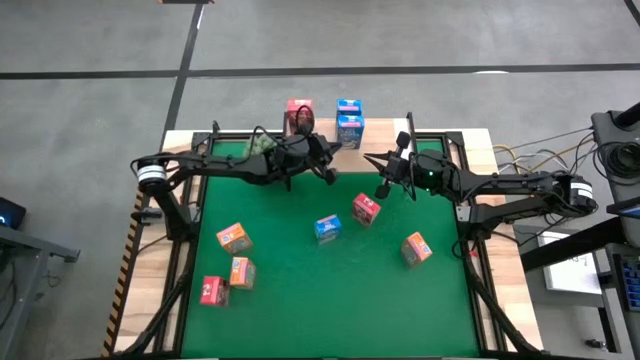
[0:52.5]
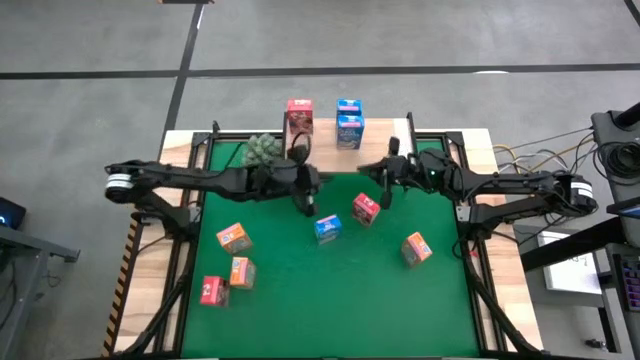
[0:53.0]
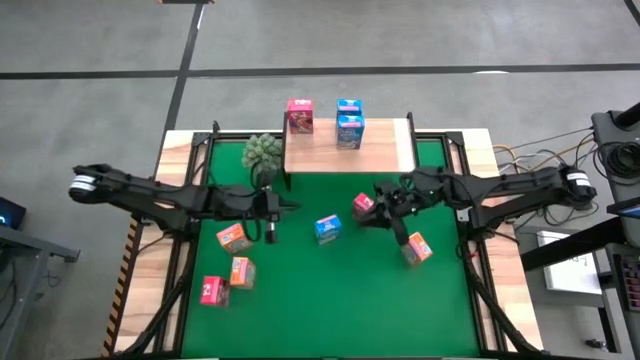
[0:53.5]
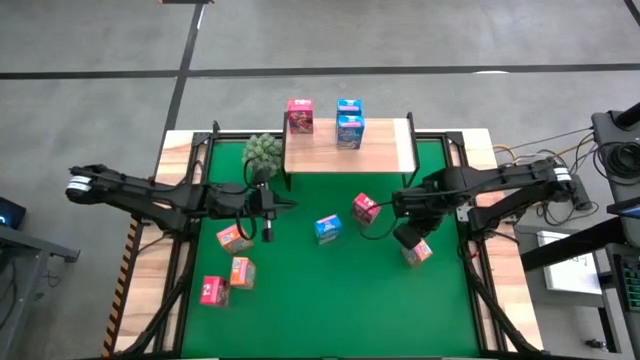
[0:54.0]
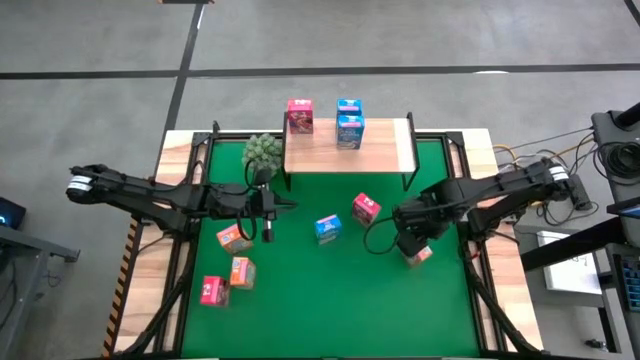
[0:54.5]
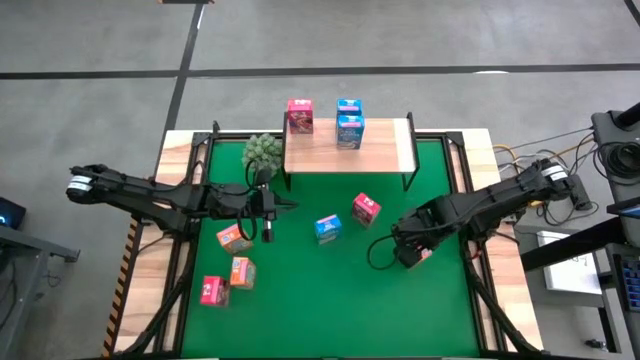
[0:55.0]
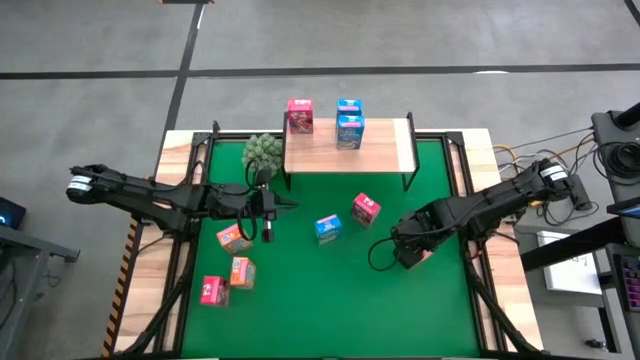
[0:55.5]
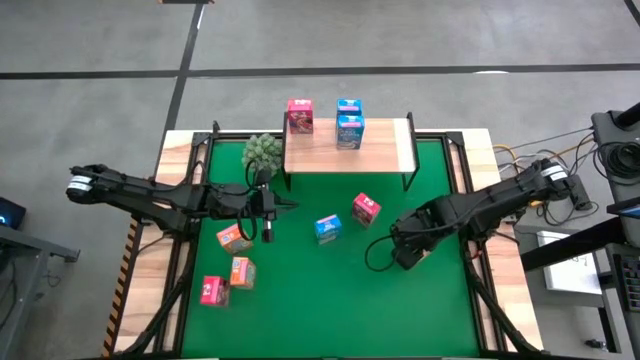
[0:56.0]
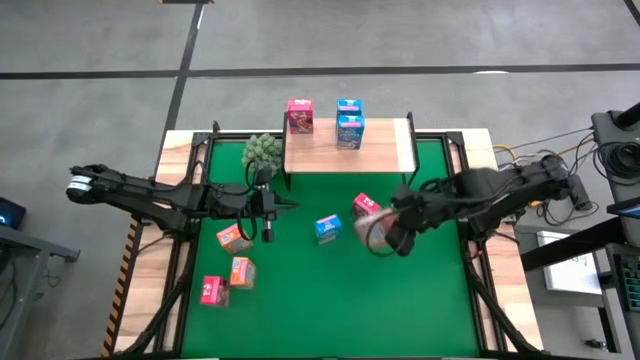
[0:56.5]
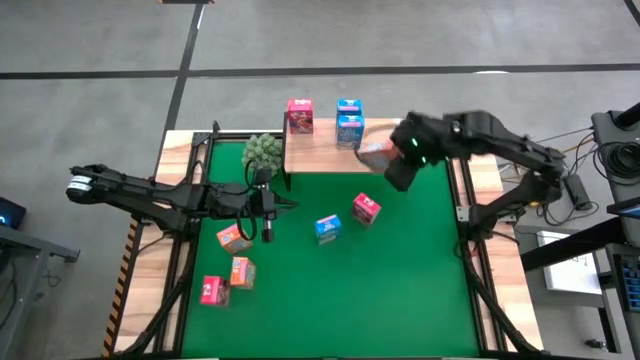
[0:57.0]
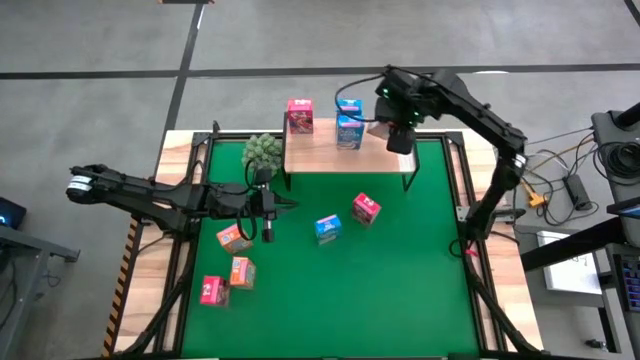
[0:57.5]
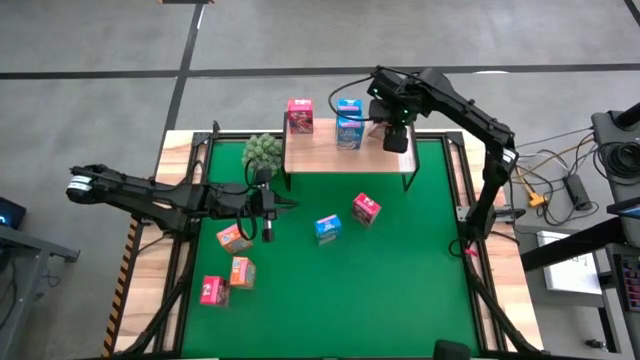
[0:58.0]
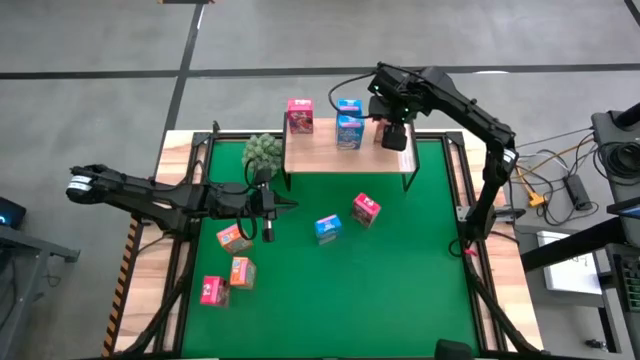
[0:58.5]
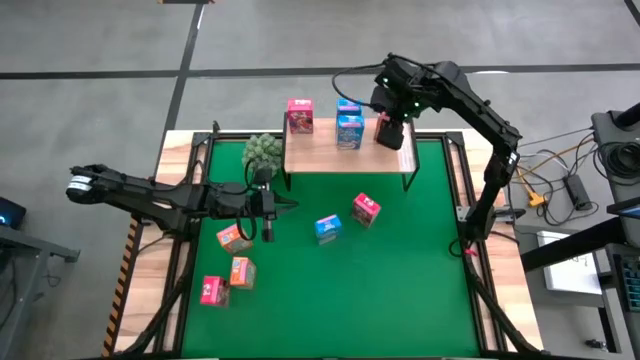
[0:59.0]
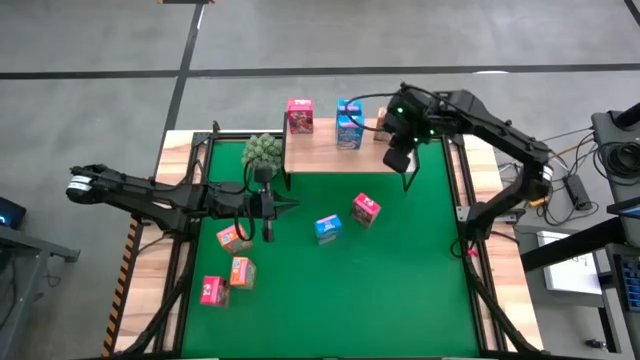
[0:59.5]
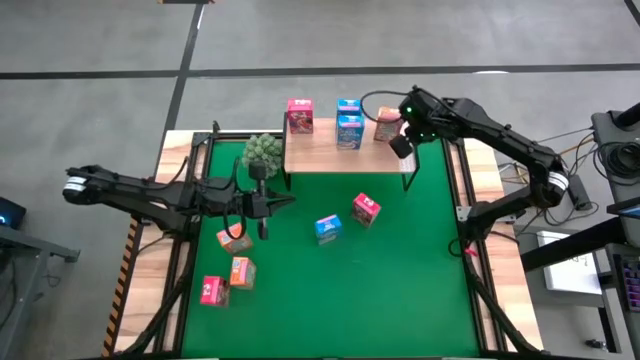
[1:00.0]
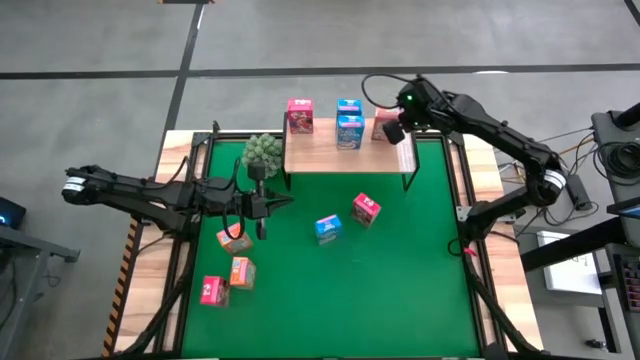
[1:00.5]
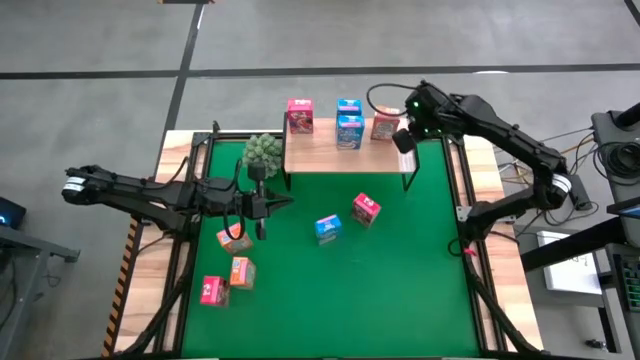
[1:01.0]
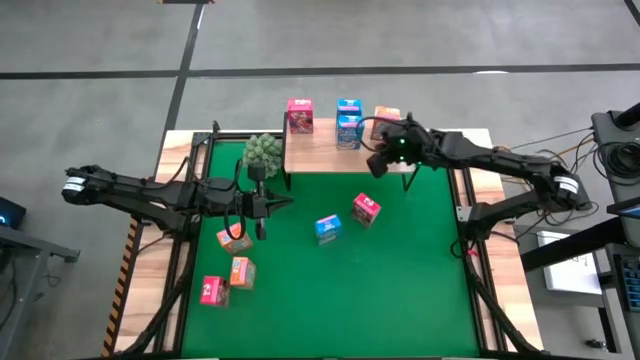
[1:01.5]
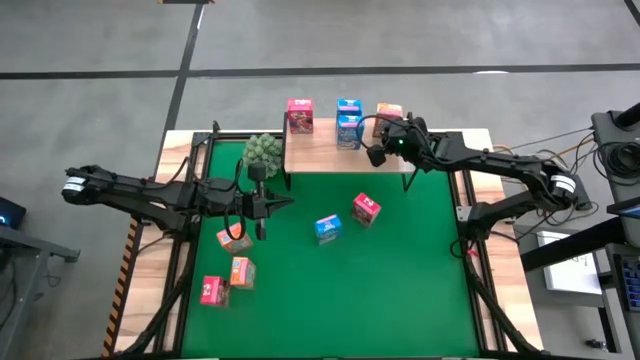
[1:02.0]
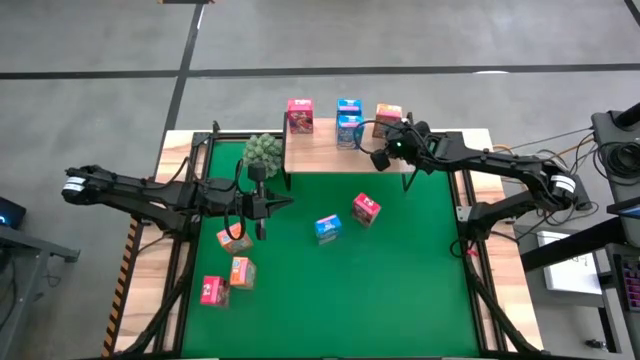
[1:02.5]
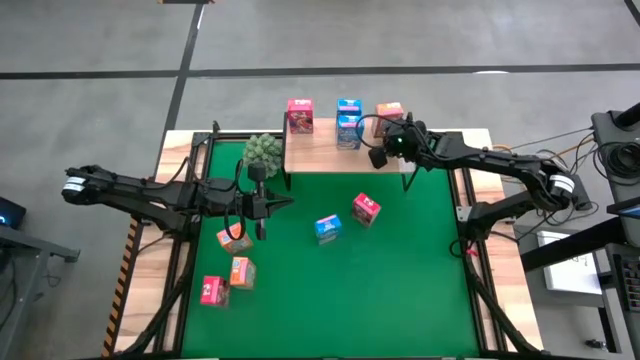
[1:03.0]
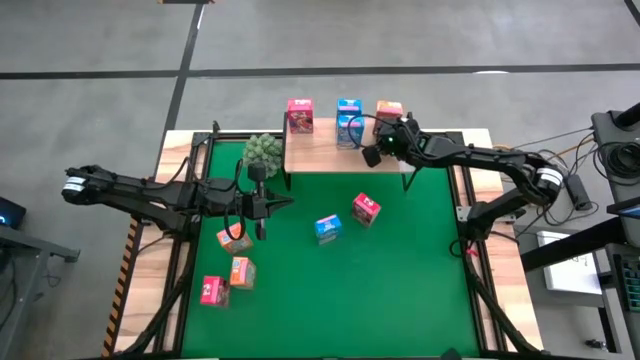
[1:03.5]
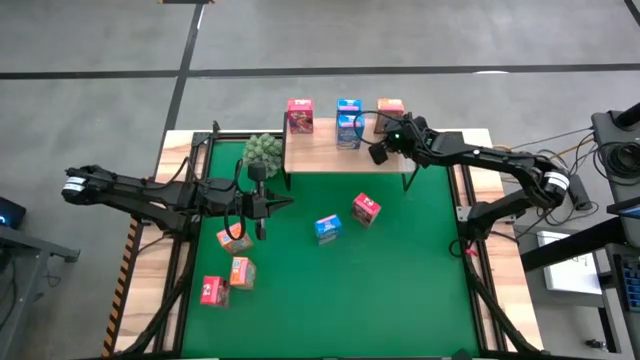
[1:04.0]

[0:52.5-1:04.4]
Task: Stack cereal on shelf
Put the middle right orange cereal box on the shelf

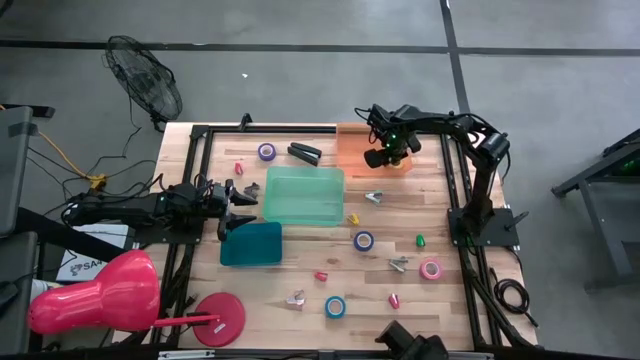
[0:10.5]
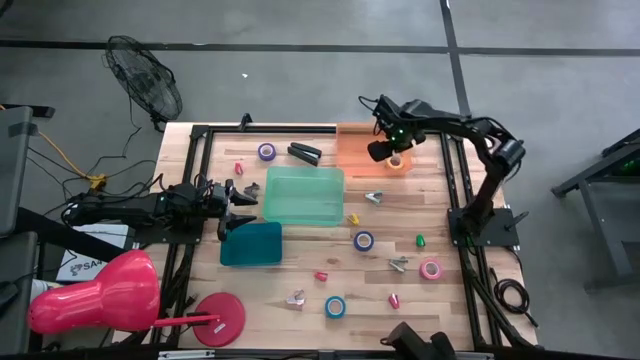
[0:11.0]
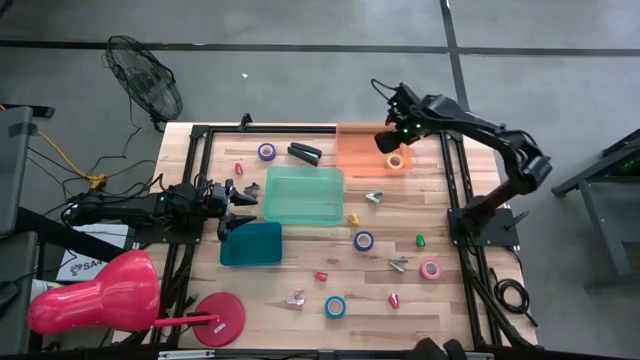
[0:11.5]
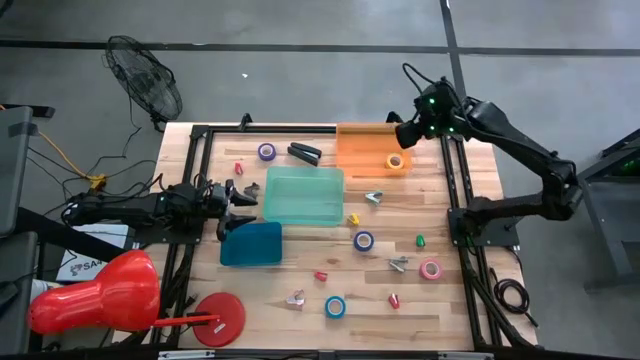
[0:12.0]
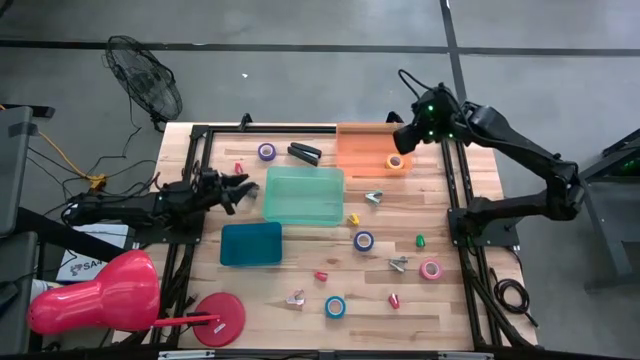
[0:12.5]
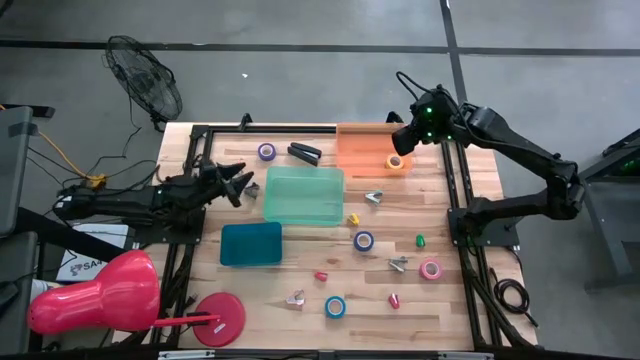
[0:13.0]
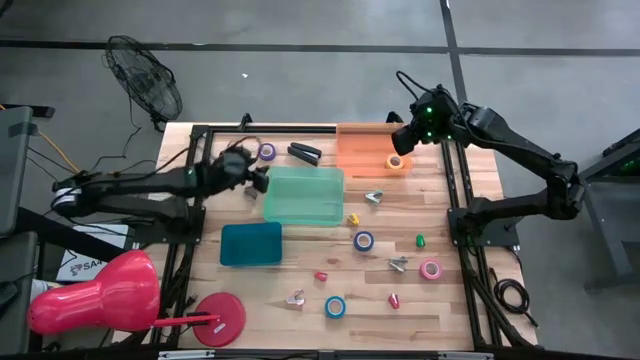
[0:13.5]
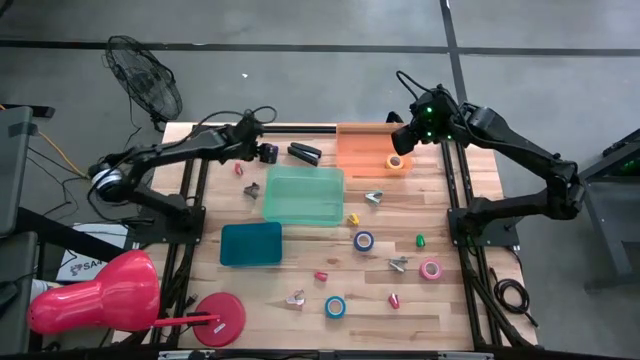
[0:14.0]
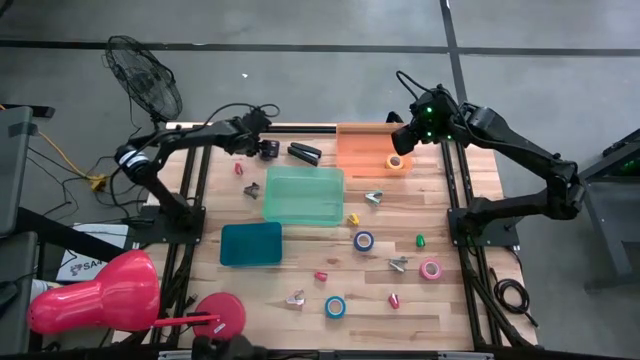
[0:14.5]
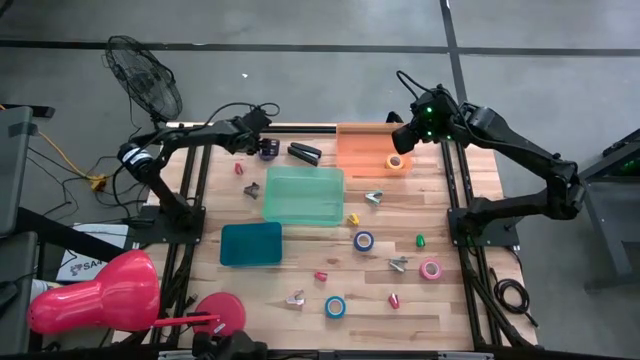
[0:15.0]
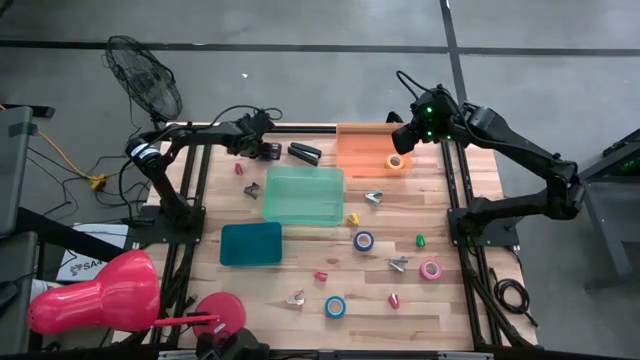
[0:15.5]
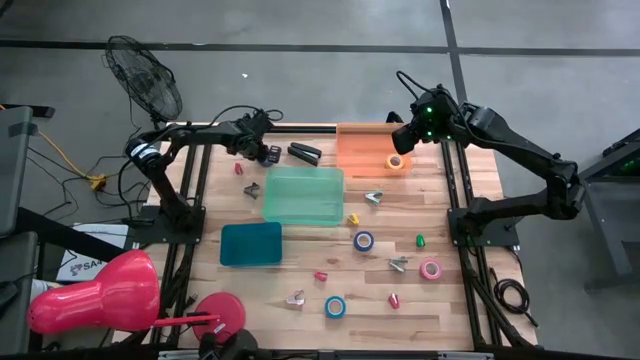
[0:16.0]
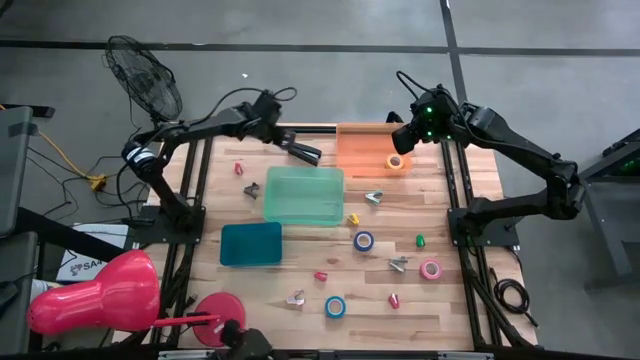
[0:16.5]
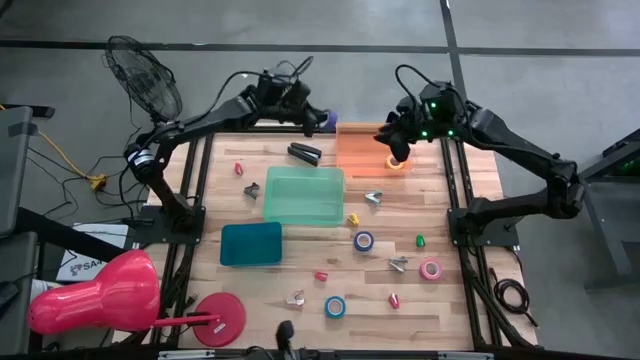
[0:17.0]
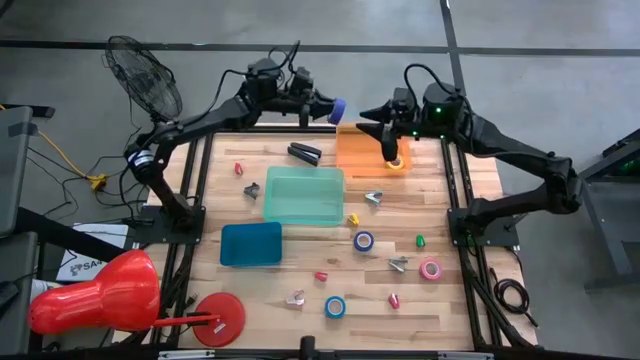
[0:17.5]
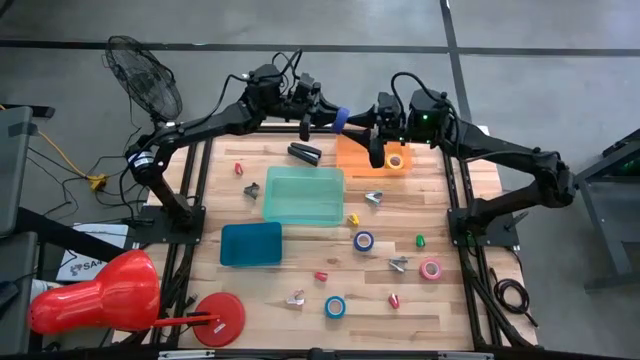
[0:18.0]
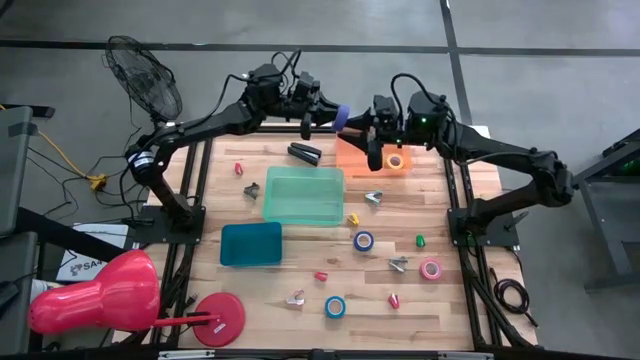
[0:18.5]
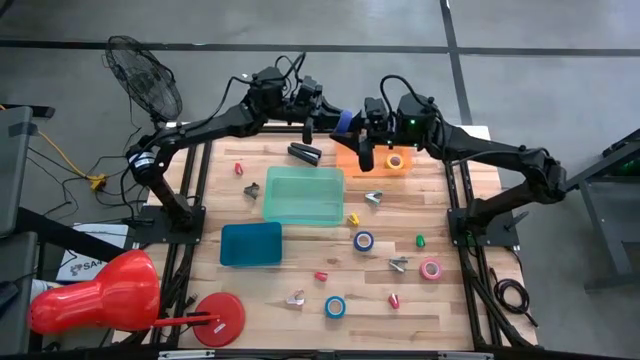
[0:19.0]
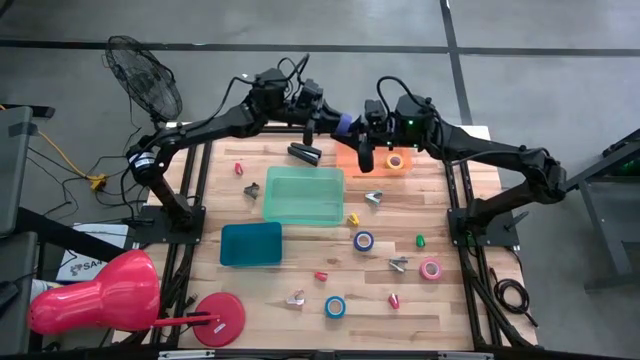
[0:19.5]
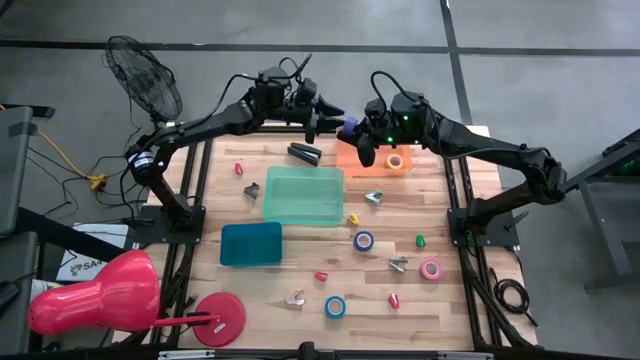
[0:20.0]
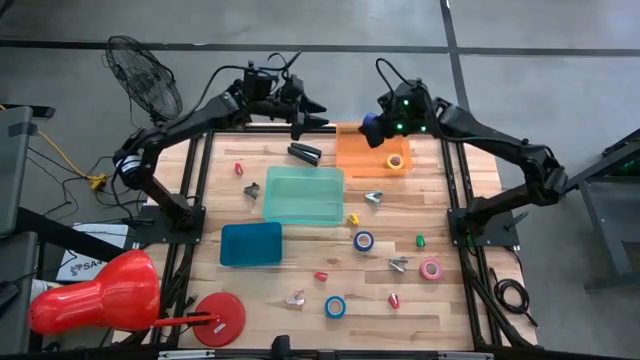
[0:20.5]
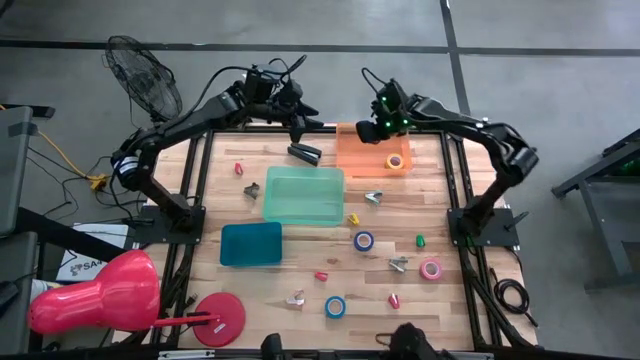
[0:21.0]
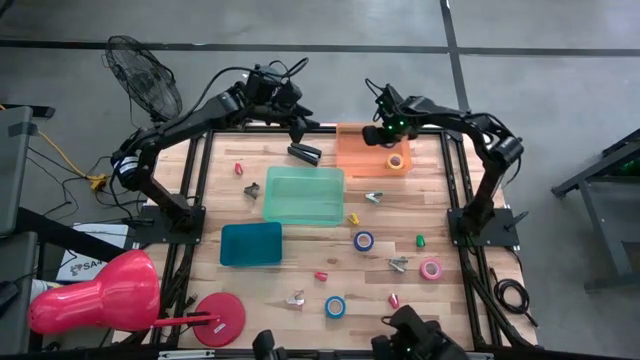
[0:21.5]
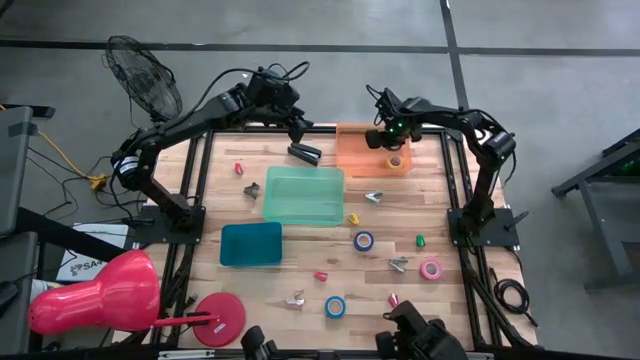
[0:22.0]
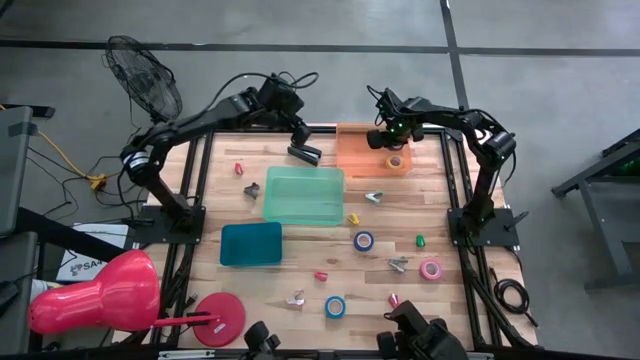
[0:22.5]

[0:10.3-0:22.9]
Task: Pick and place Stapler, Stapler remover, tape
Put the top blue tape in the orange bin
